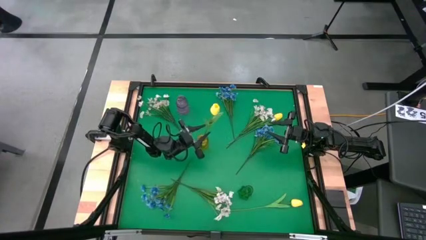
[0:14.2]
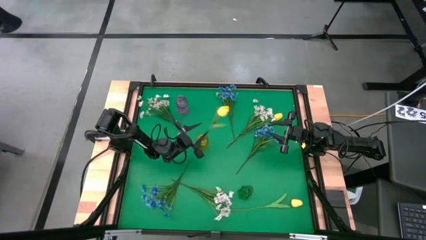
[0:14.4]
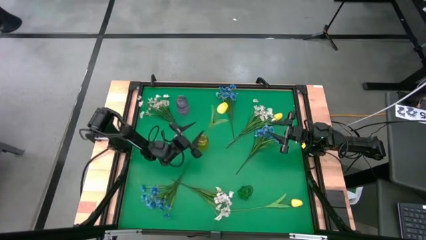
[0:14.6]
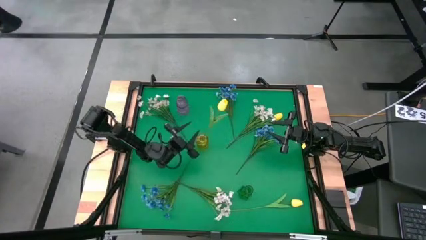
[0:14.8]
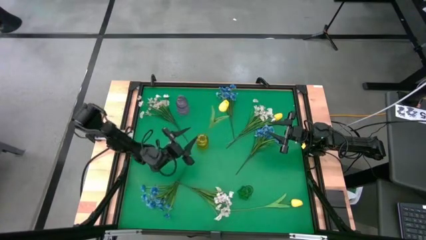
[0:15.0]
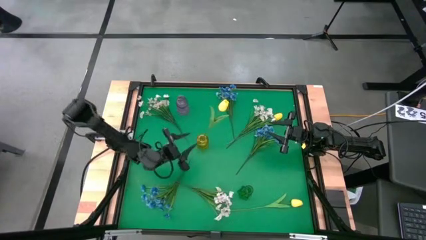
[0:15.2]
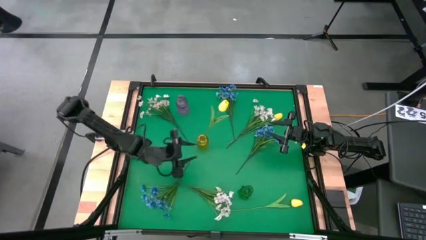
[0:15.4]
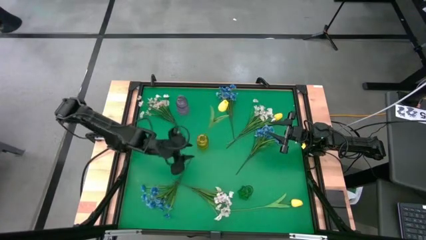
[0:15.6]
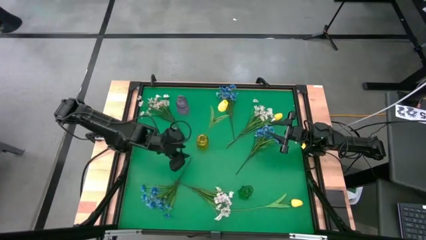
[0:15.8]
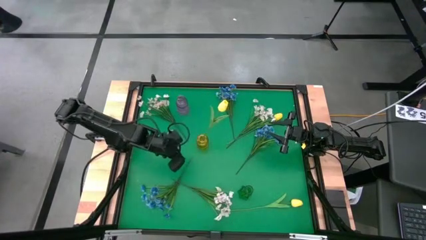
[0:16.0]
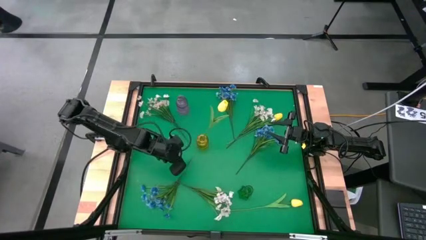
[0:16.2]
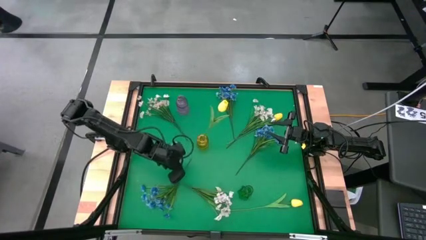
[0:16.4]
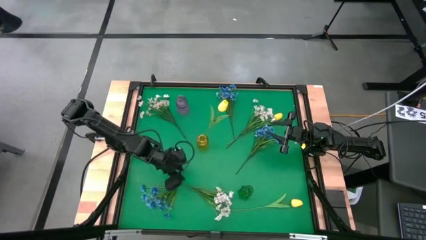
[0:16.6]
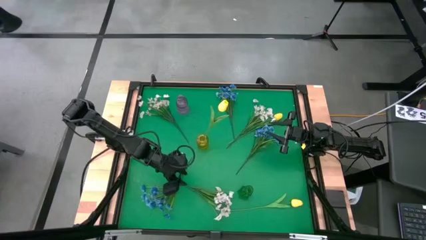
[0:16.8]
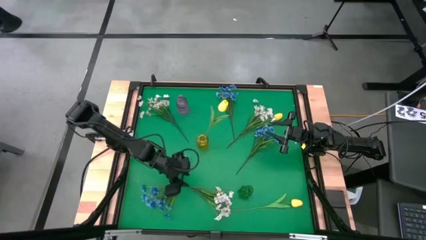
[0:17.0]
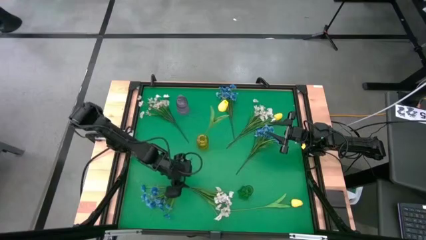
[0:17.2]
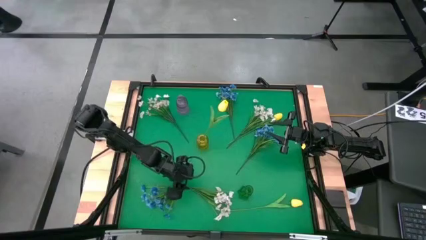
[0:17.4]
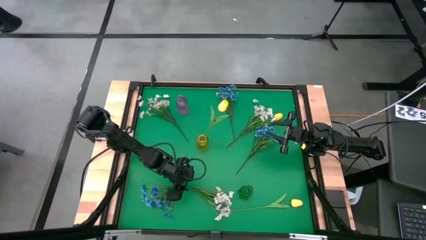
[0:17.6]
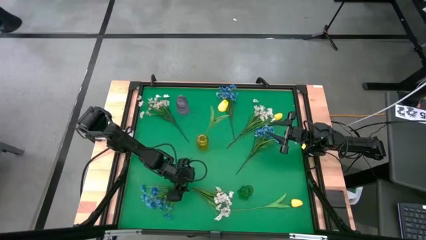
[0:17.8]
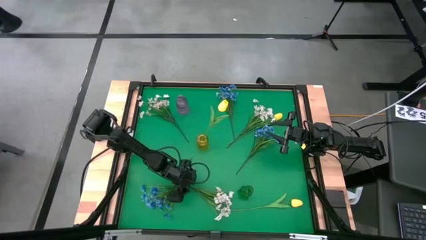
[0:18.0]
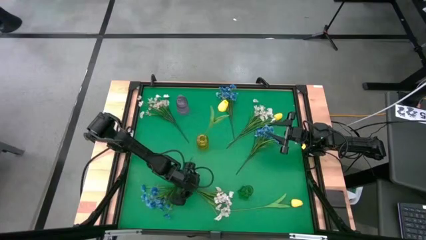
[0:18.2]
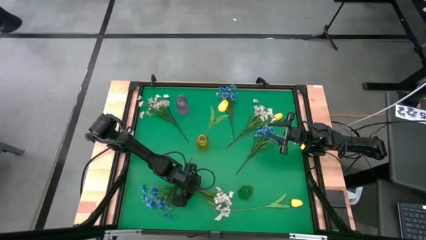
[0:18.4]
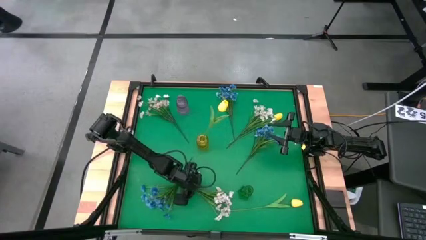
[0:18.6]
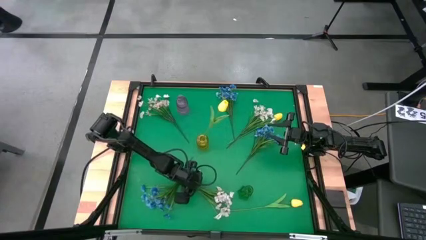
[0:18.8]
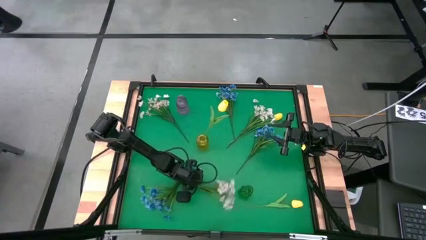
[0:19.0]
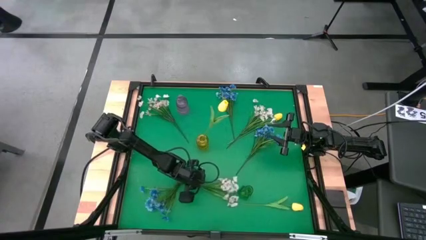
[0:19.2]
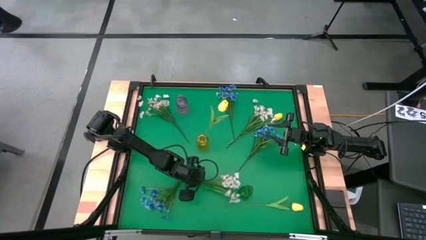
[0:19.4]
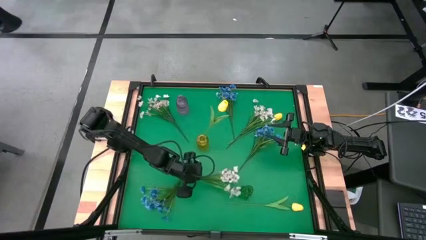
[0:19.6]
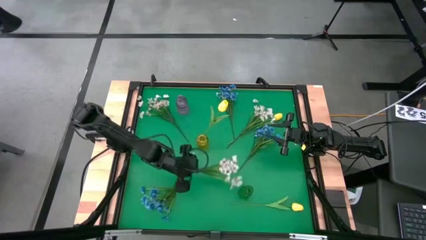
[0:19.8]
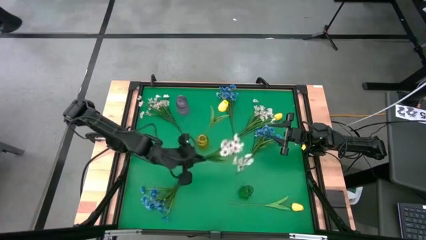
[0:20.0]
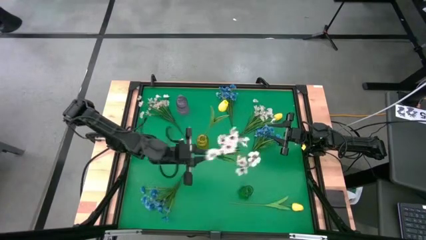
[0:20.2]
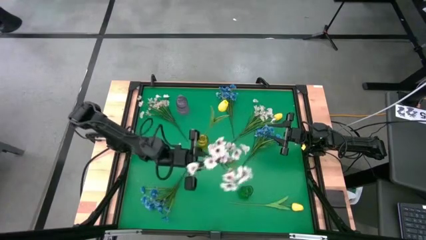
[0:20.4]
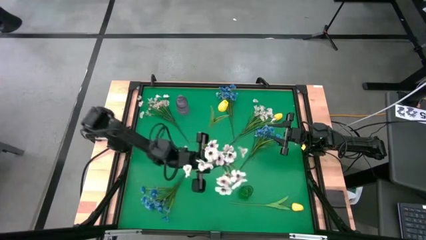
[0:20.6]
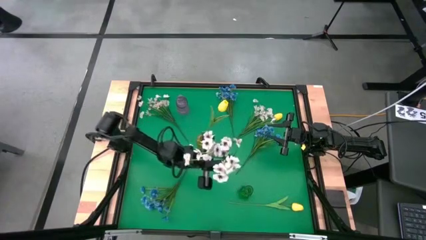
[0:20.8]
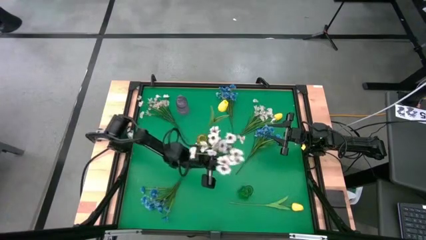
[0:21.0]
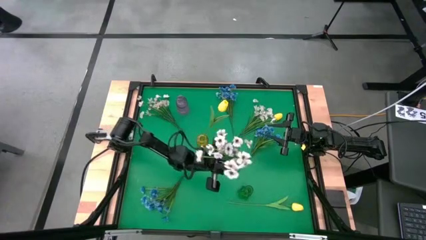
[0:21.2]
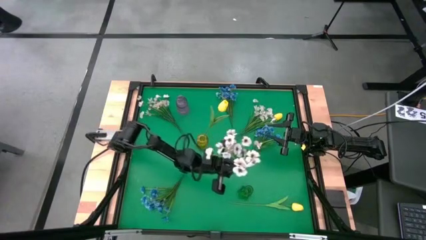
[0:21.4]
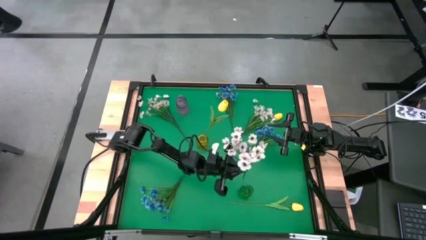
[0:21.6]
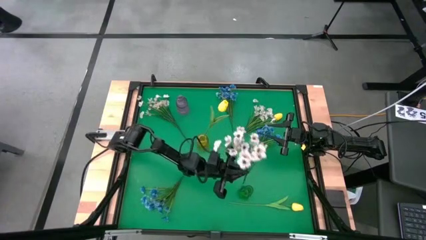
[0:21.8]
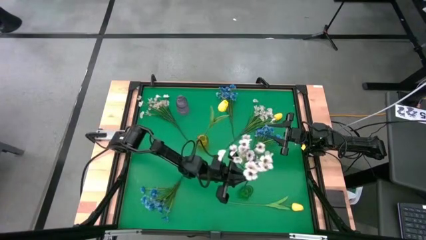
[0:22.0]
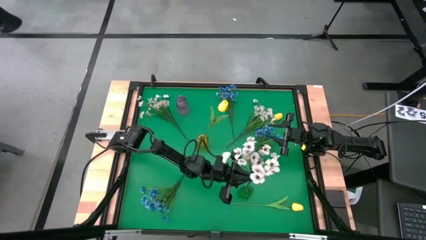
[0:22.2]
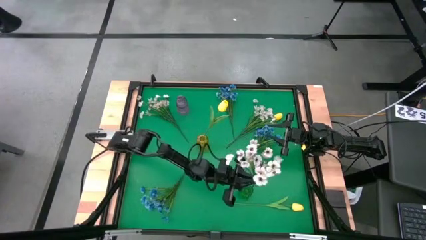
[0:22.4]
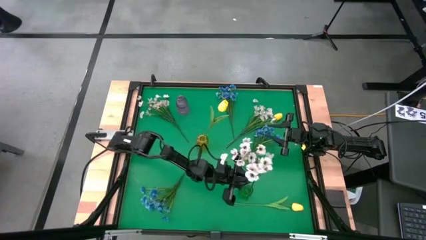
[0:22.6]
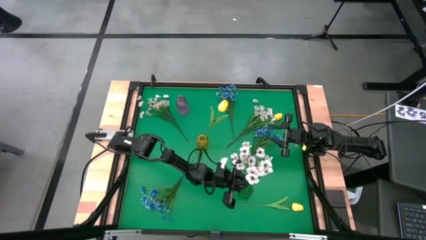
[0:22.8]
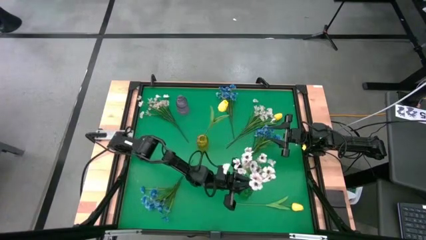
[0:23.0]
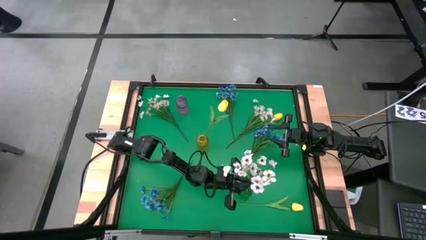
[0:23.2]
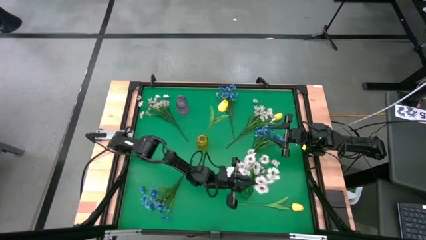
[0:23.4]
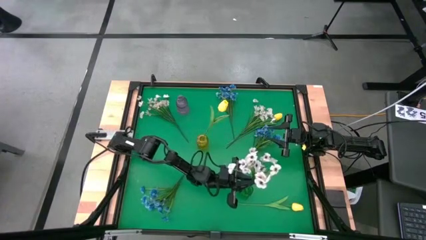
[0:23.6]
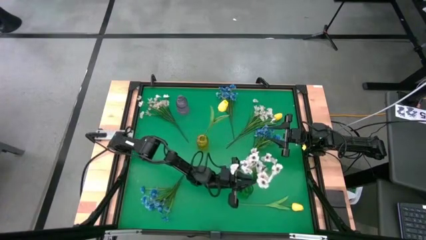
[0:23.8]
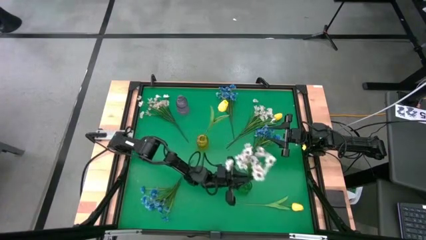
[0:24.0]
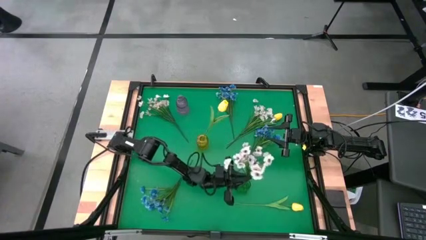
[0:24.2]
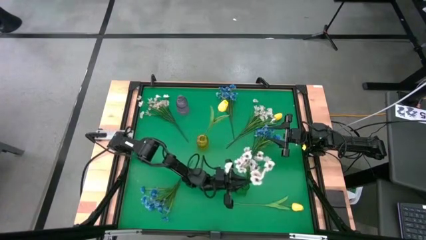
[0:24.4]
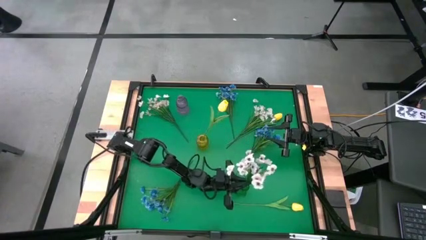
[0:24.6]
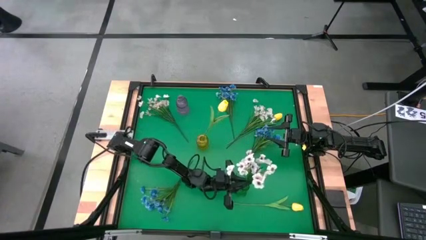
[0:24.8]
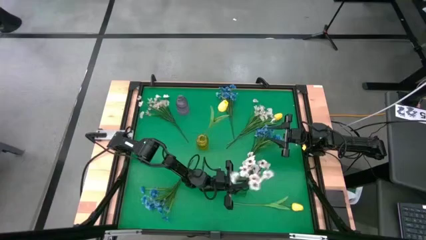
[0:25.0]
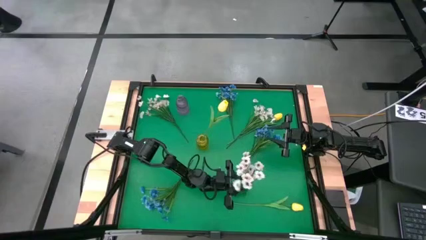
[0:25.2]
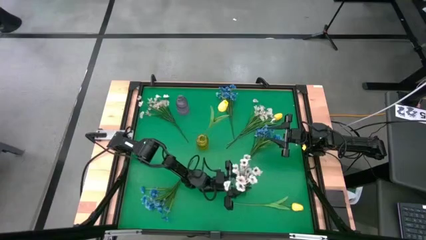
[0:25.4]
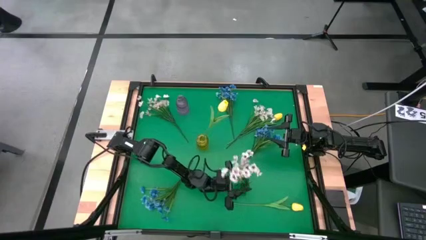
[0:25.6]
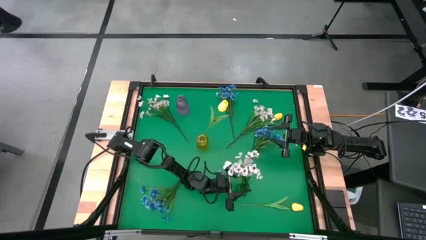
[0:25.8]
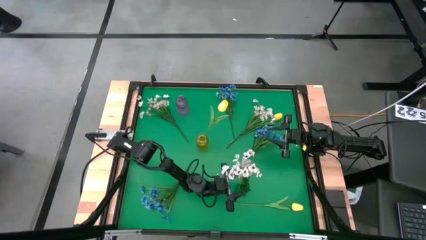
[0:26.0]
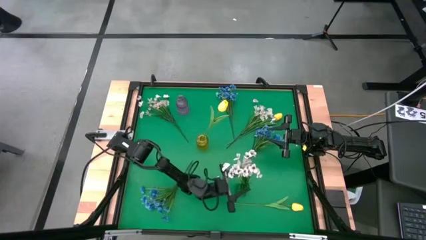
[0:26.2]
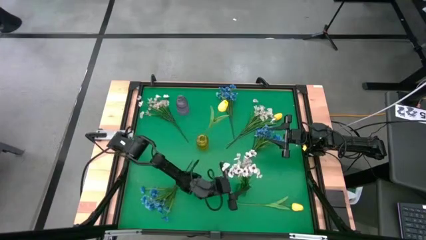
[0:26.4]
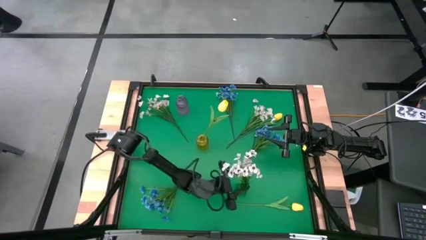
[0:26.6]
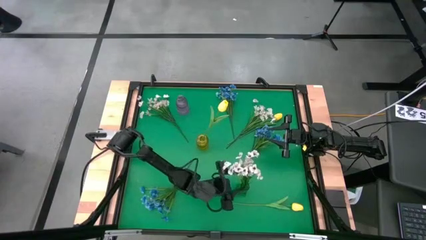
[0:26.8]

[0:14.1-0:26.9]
Task: Sort flowers into vase by color
Put the bottom white flowers into the green vase
